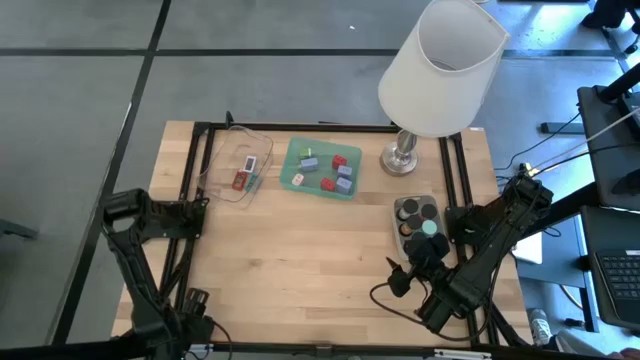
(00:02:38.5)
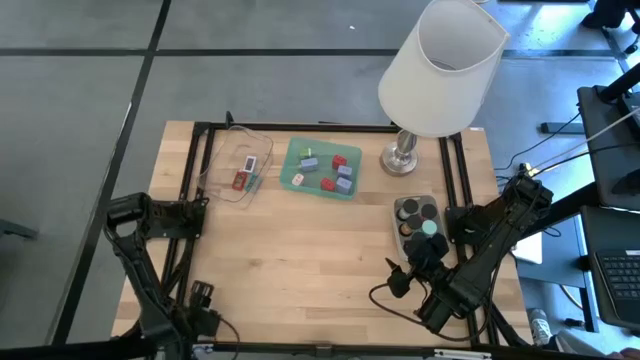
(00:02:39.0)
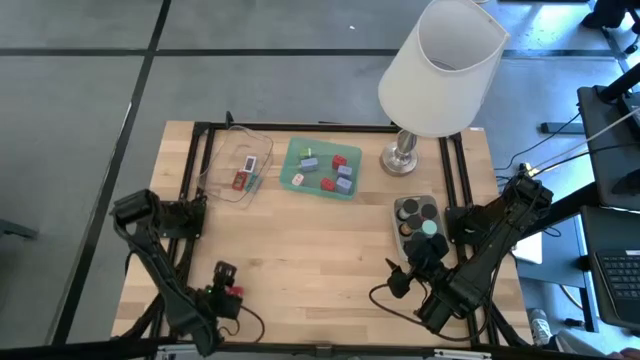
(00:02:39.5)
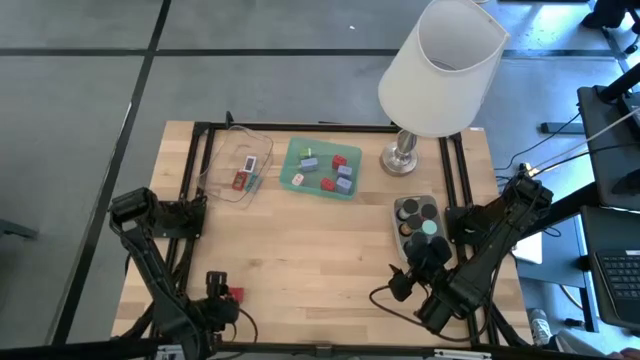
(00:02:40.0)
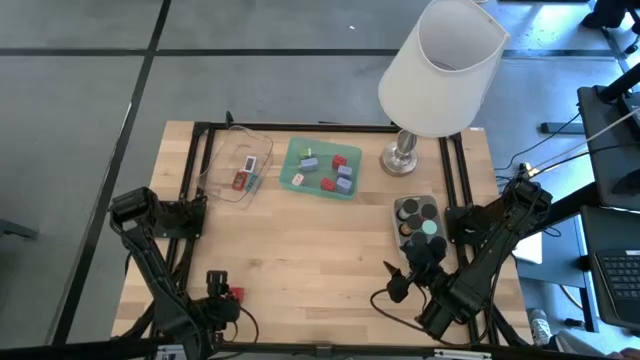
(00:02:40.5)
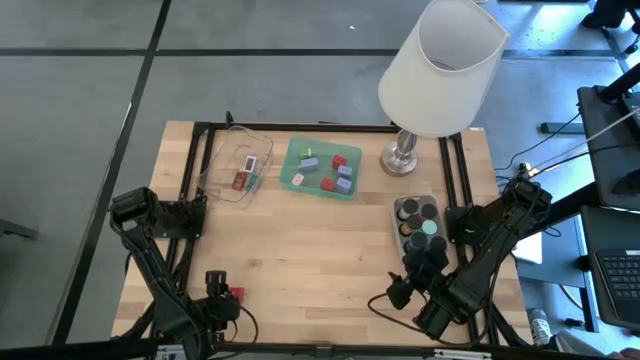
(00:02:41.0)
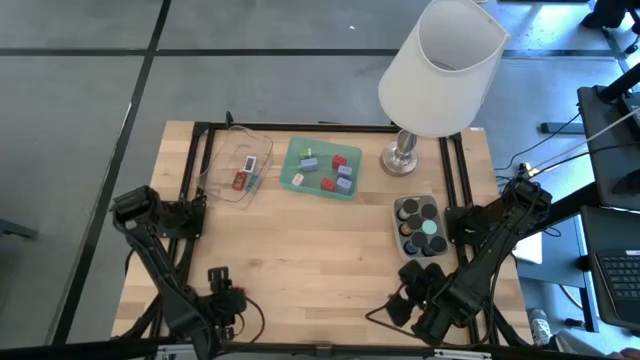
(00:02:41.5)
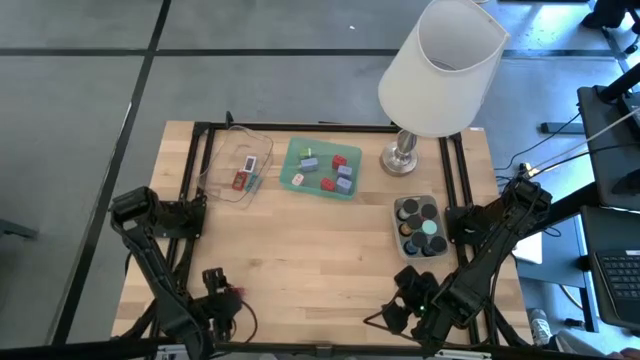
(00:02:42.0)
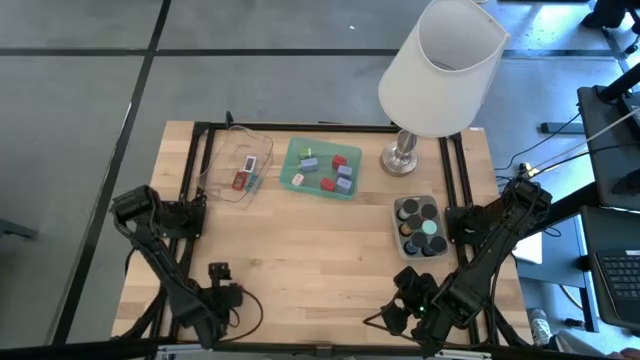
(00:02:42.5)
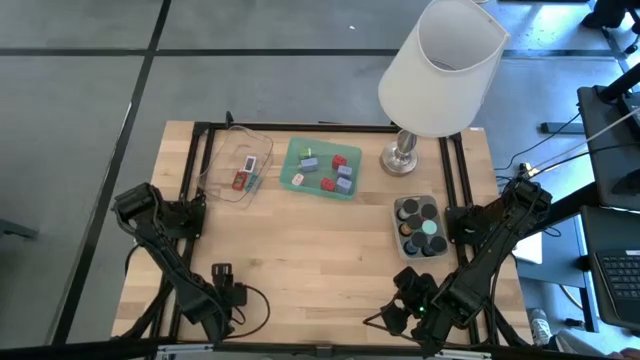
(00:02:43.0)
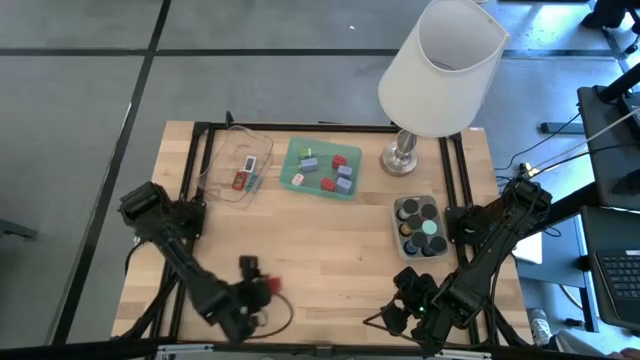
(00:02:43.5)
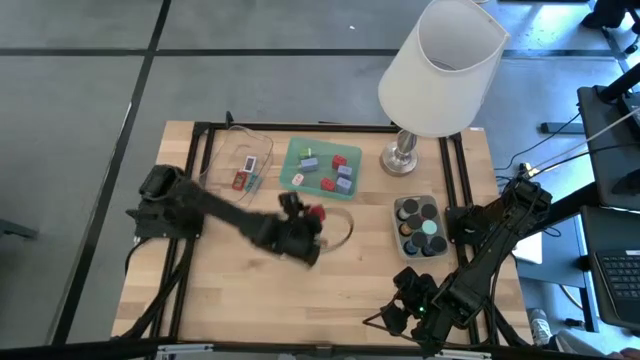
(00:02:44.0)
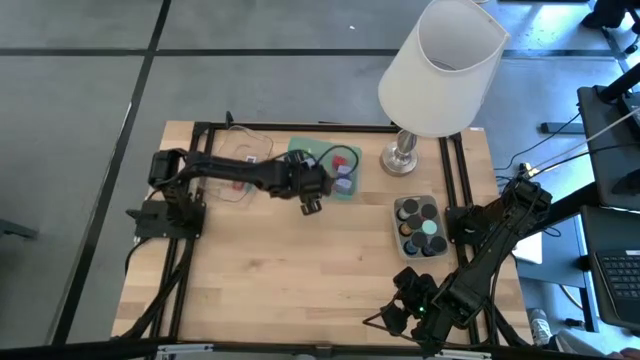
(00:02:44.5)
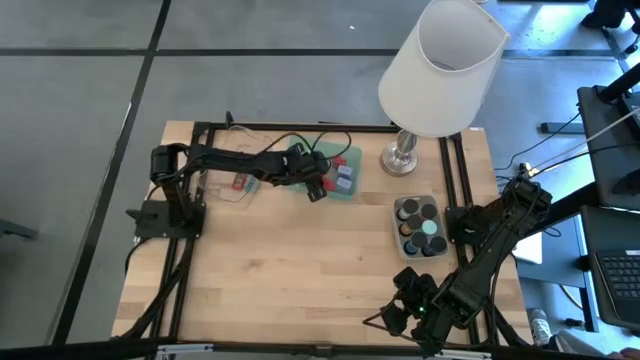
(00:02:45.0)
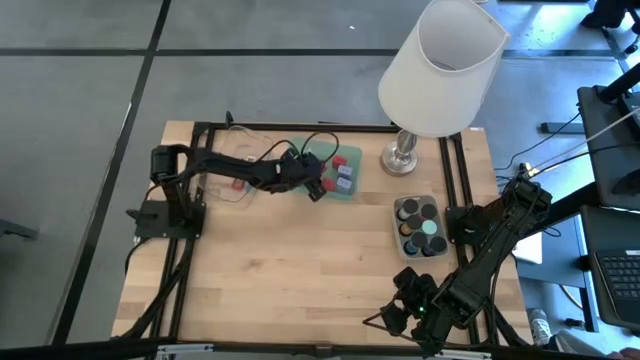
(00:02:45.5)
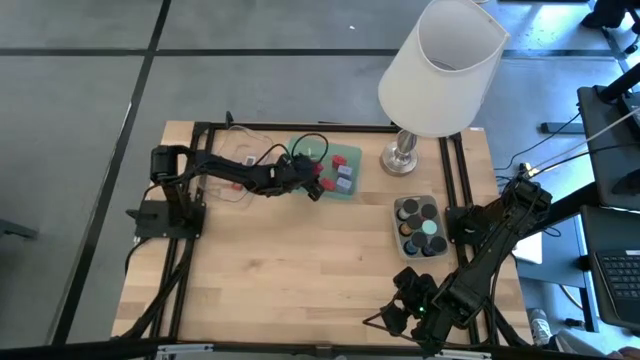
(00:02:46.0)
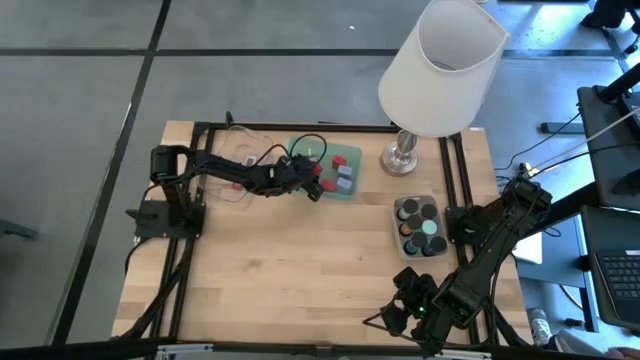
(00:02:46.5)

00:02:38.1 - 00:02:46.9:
Task: Pick & Place Office items
Put the red charger adapter into the green bin

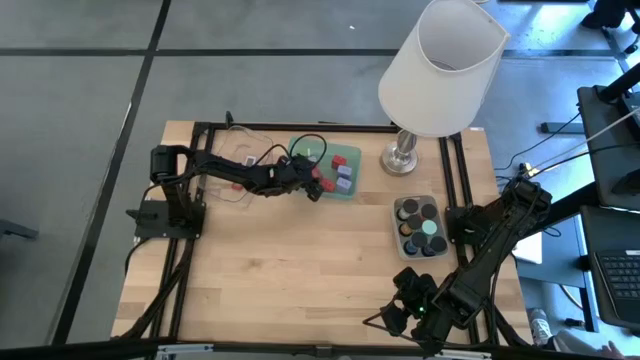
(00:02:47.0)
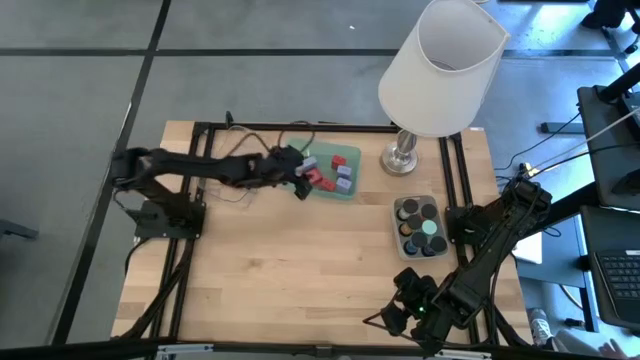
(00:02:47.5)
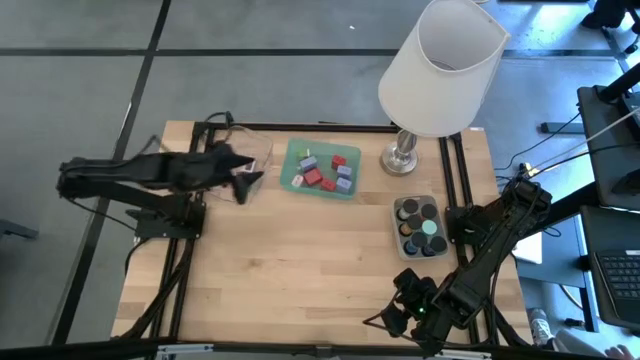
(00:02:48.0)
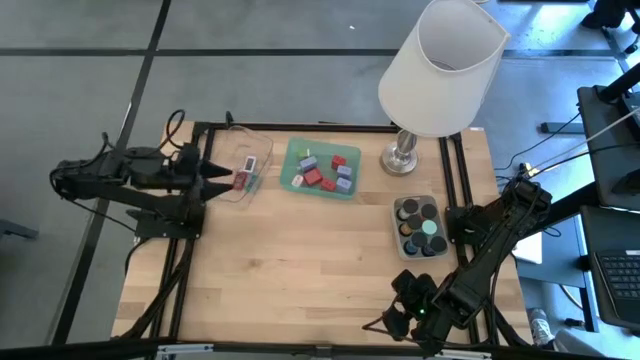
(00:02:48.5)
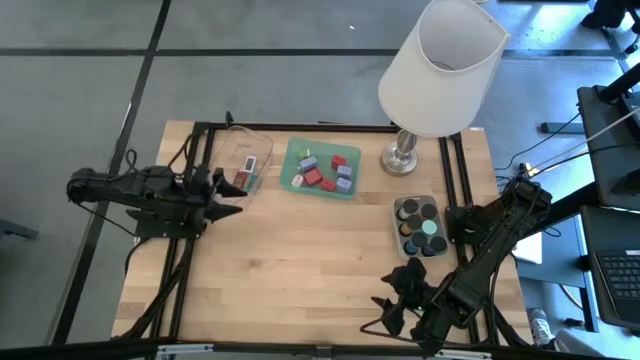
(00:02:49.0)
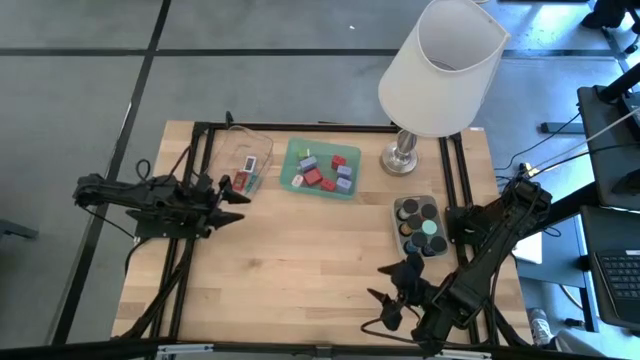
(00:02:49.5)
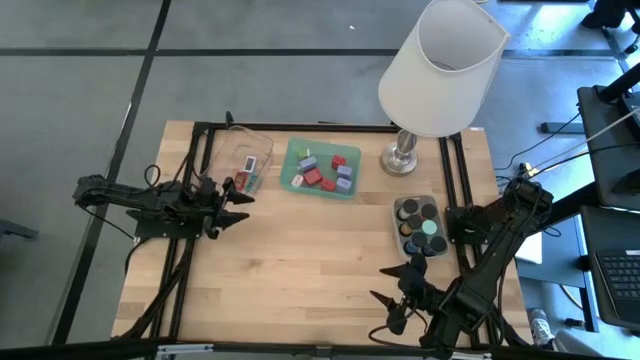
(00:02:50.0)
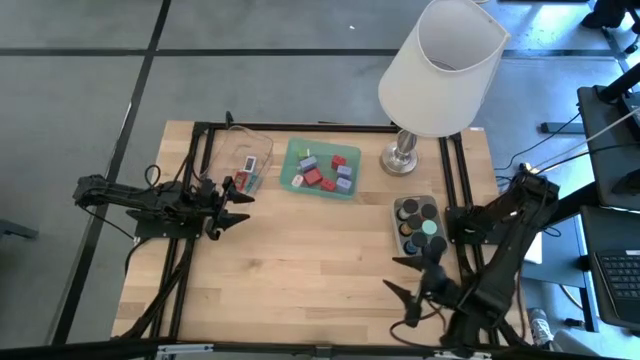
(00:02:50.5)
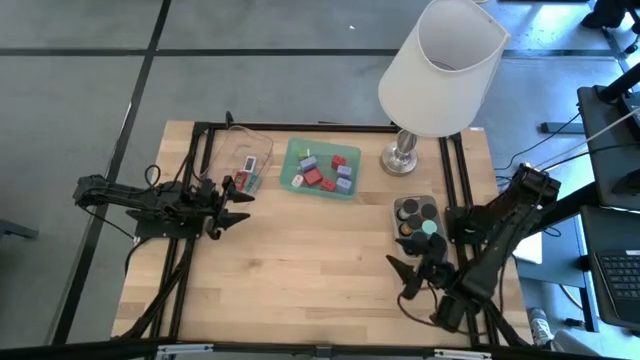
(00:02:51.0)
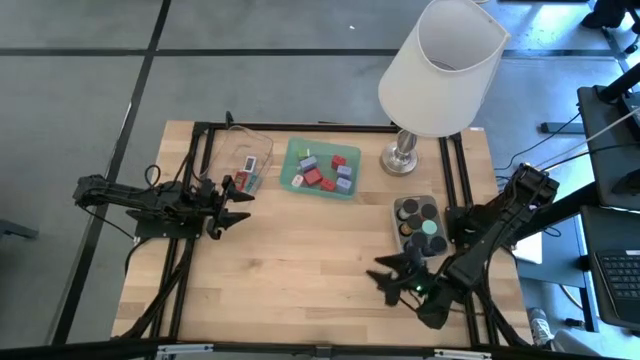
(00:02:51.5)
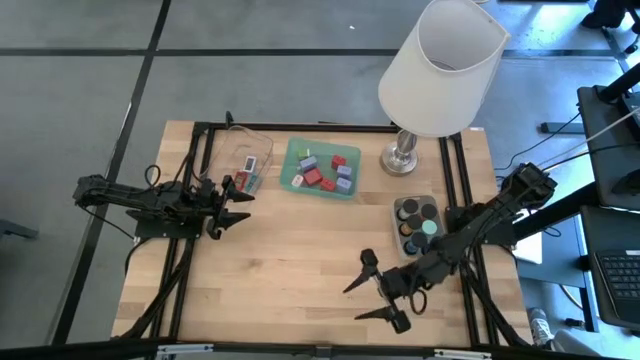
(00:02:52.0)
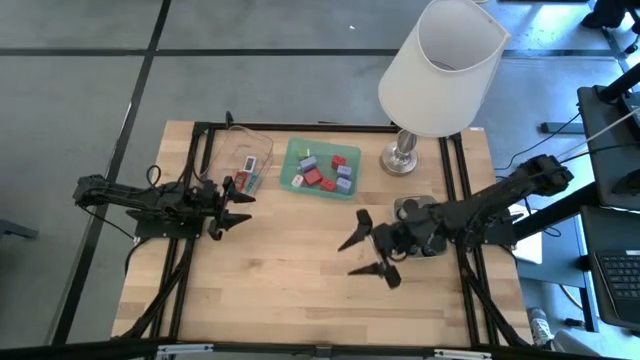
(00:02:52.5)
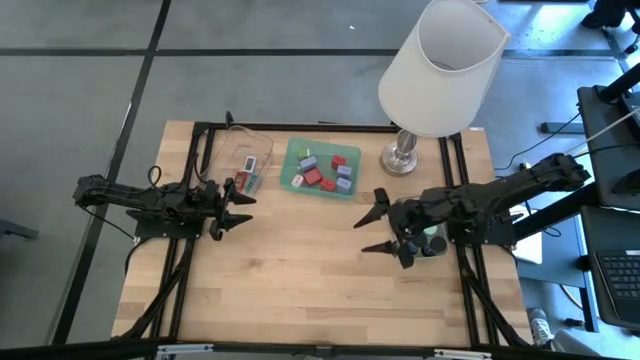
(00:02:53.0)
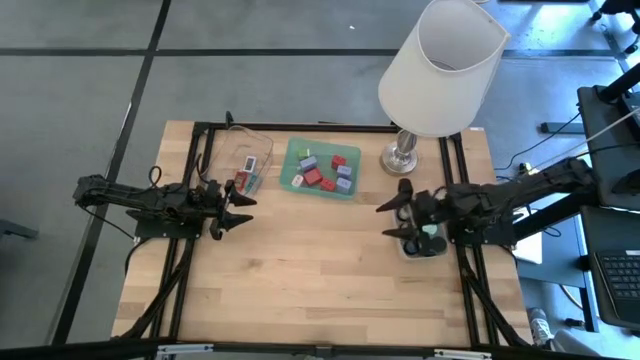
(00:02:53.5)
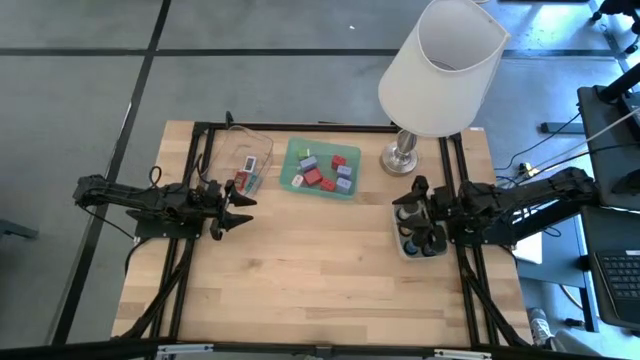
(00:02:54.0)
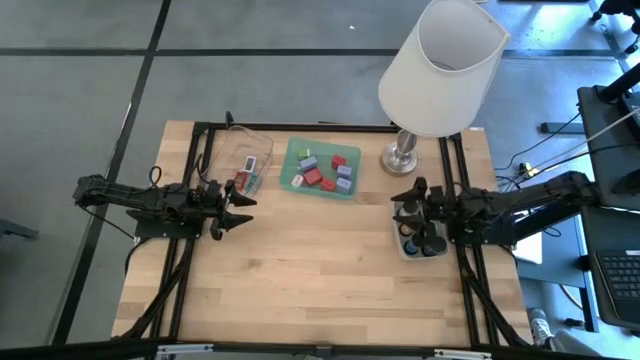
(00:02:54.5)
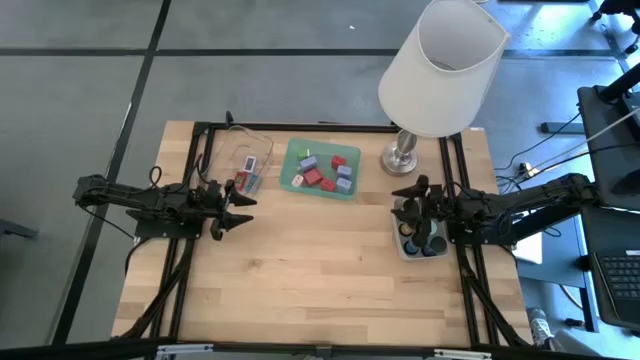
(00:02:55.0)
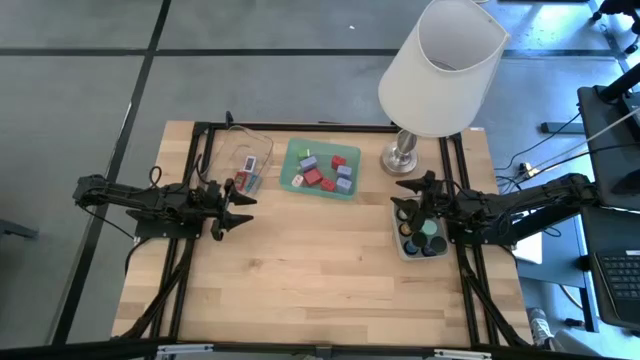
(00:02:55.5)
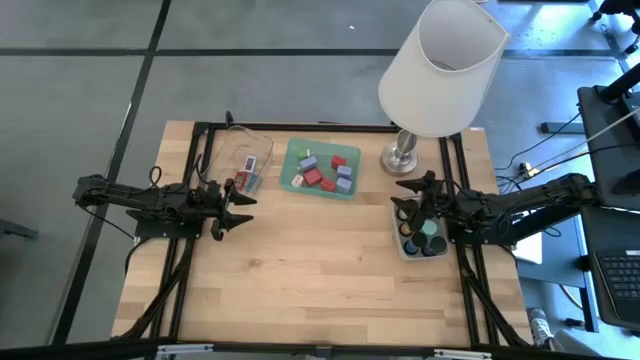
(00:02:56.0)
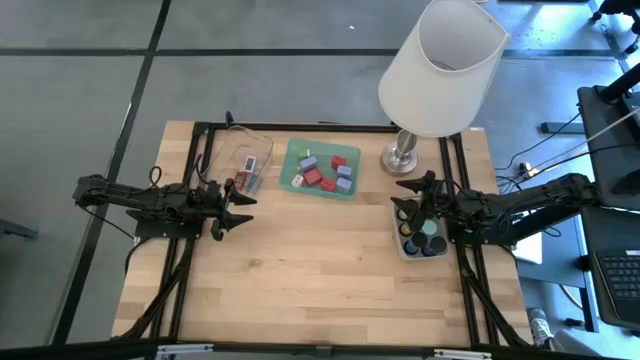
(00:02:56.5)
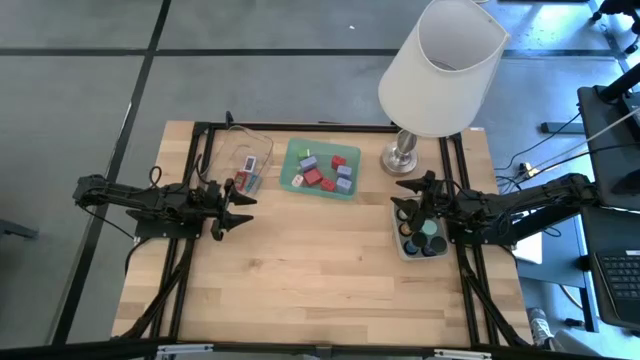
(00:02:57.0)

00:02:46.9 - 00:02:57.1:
Return to Home Position
